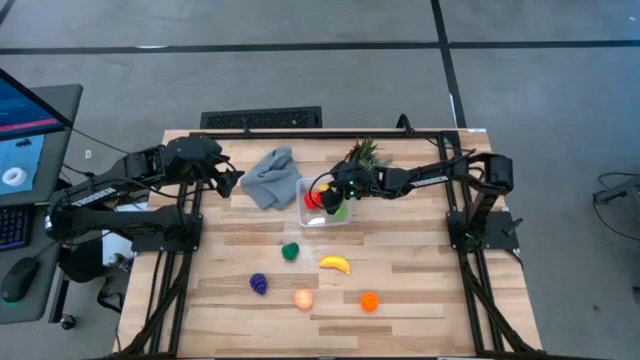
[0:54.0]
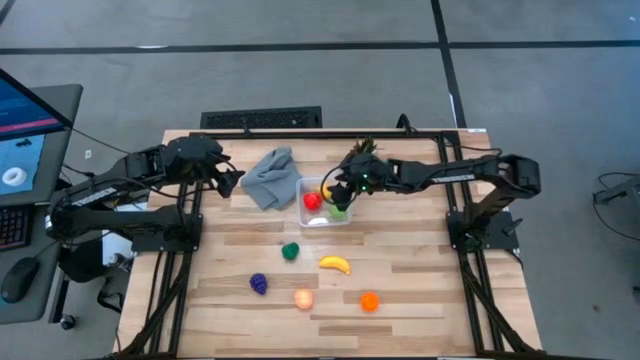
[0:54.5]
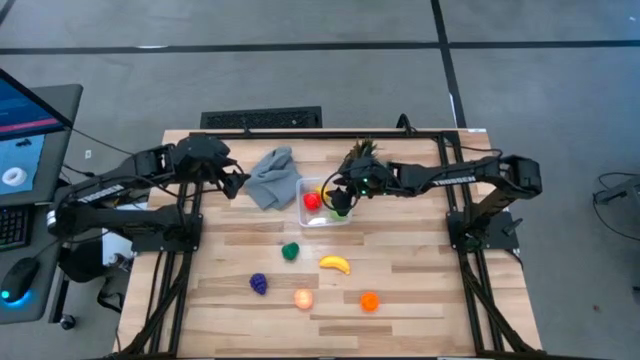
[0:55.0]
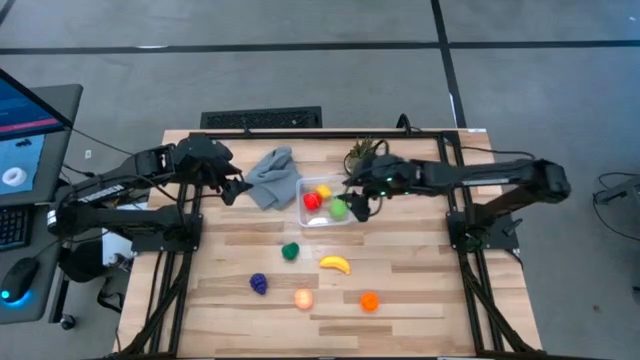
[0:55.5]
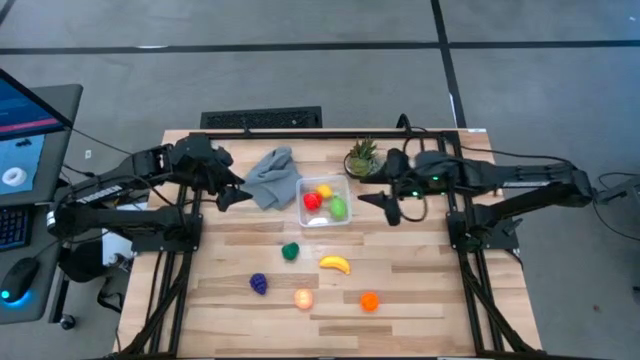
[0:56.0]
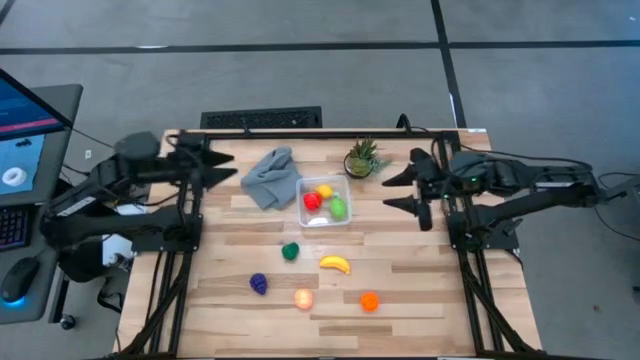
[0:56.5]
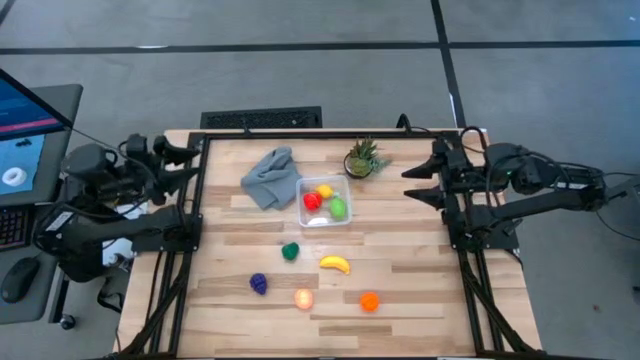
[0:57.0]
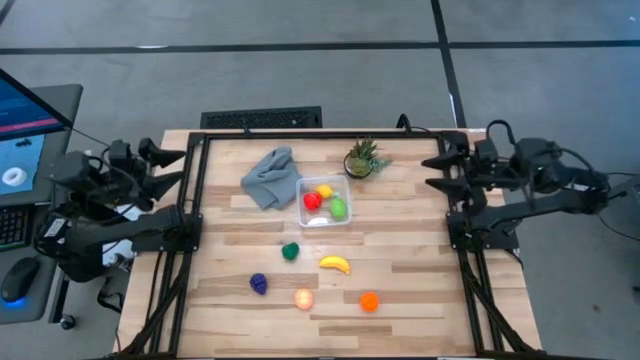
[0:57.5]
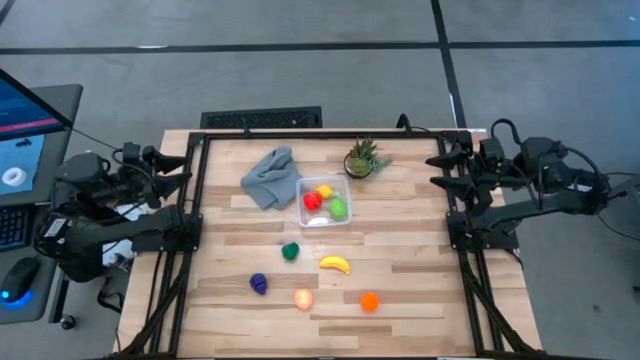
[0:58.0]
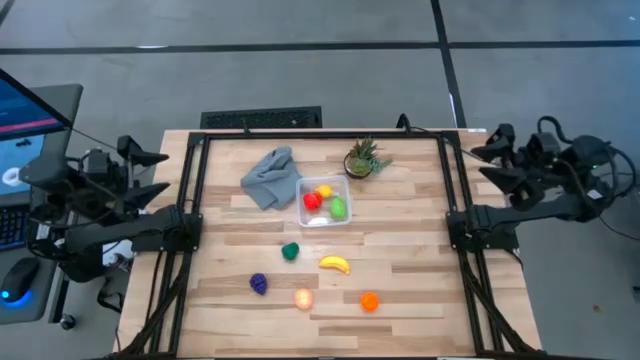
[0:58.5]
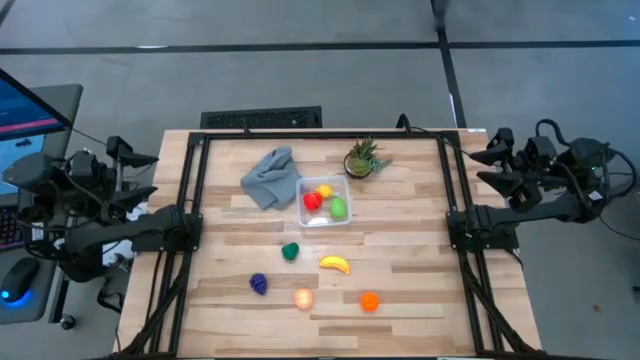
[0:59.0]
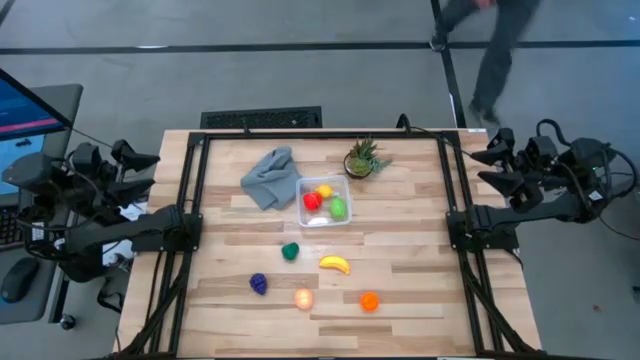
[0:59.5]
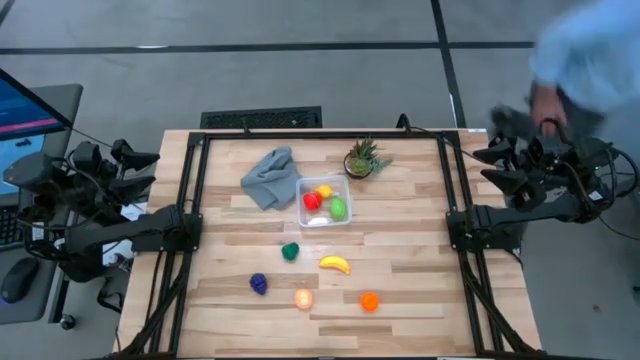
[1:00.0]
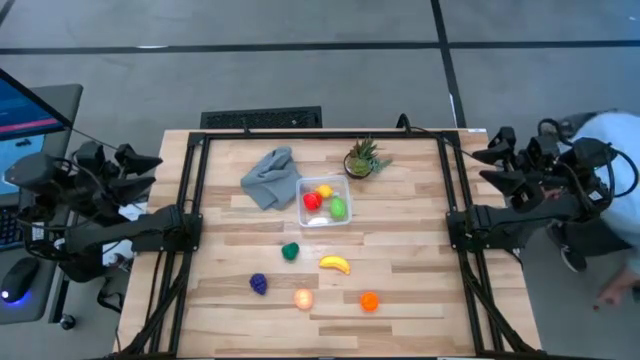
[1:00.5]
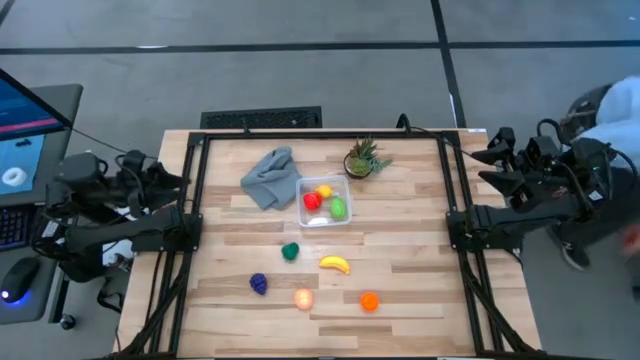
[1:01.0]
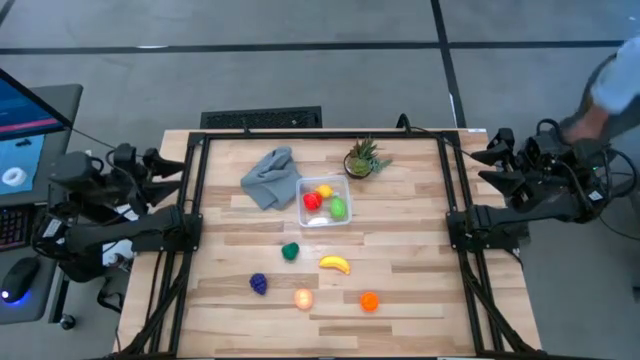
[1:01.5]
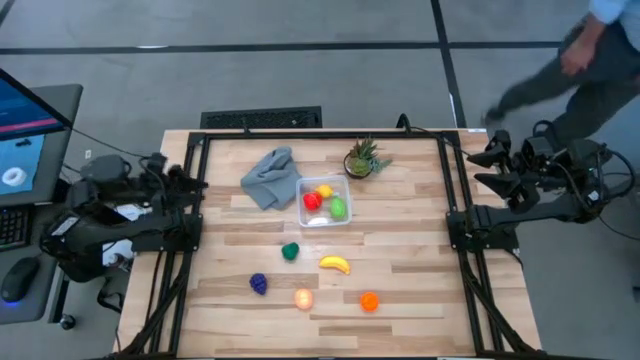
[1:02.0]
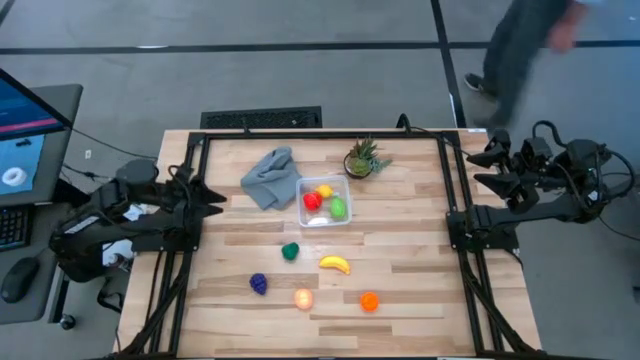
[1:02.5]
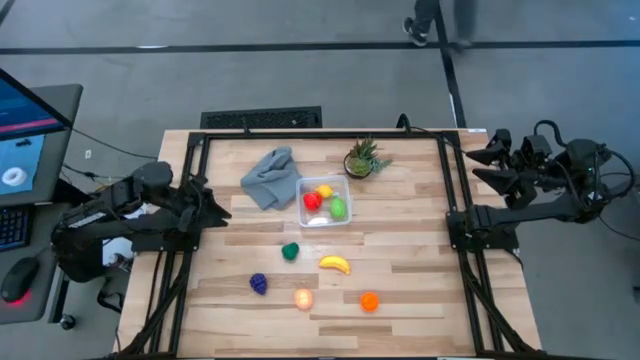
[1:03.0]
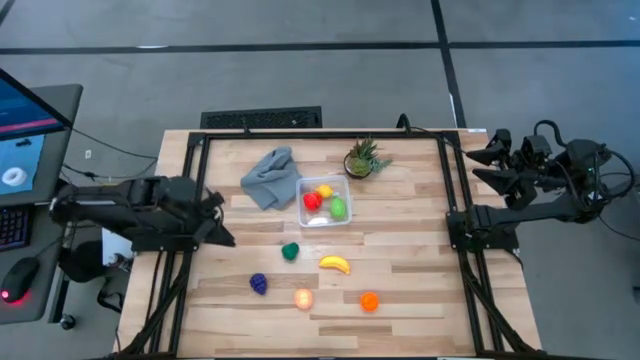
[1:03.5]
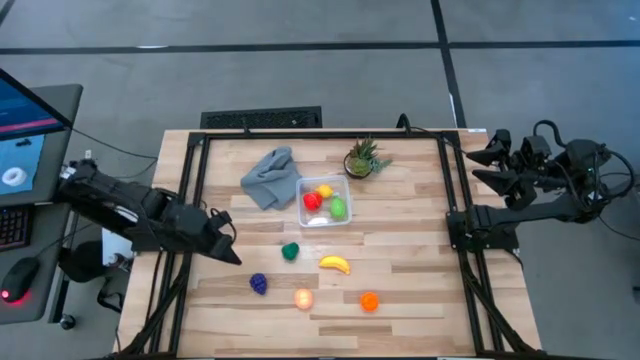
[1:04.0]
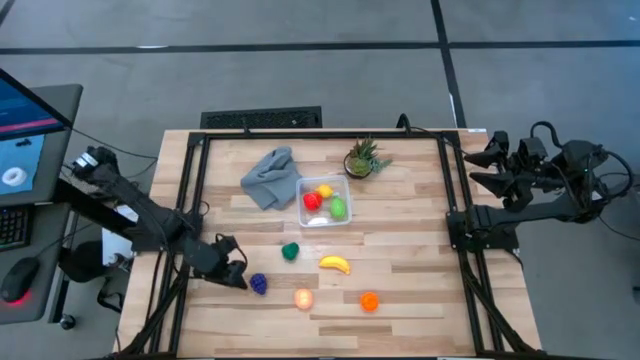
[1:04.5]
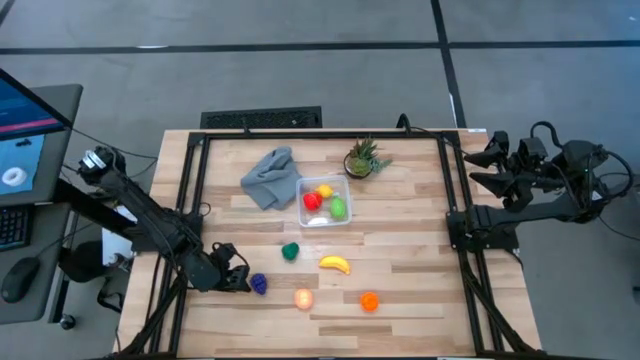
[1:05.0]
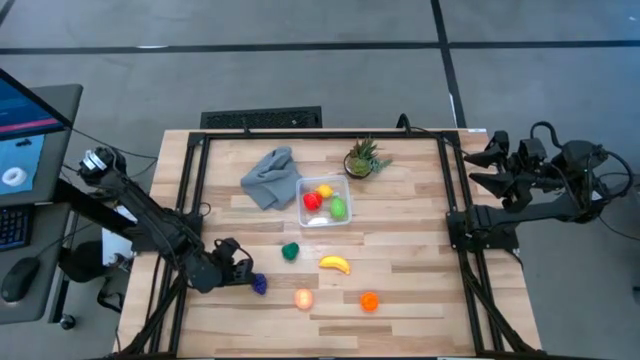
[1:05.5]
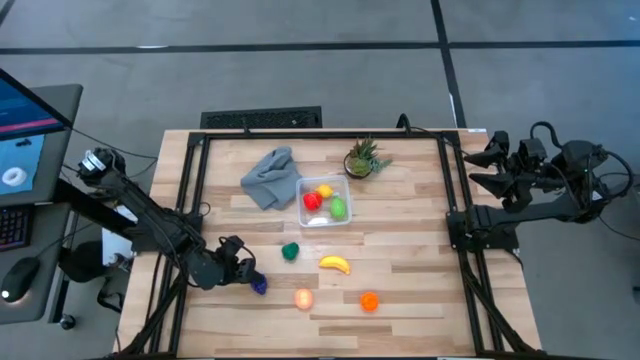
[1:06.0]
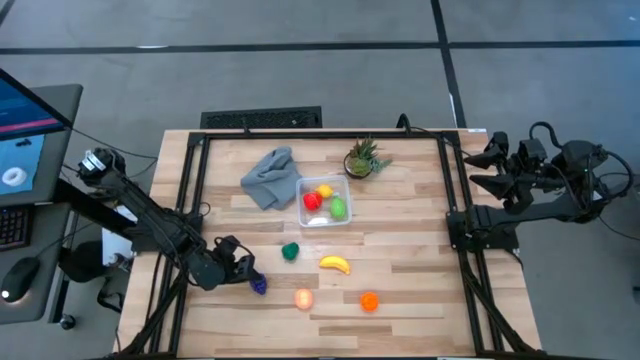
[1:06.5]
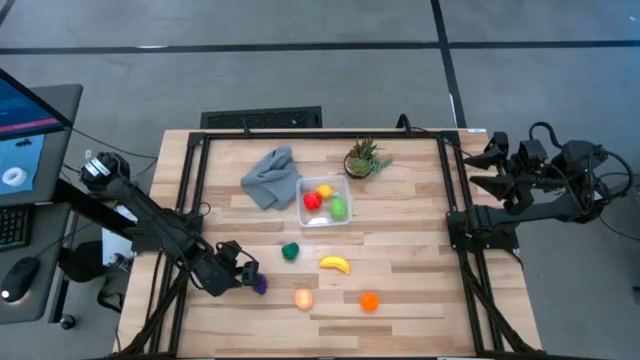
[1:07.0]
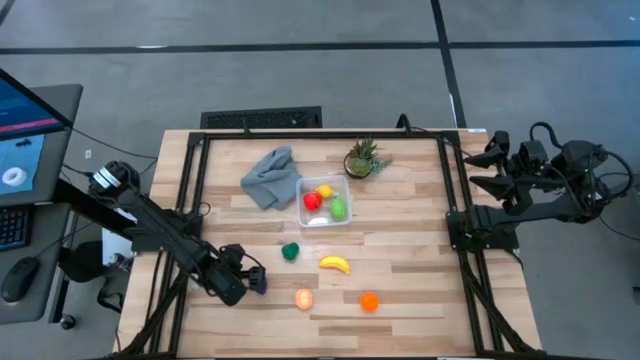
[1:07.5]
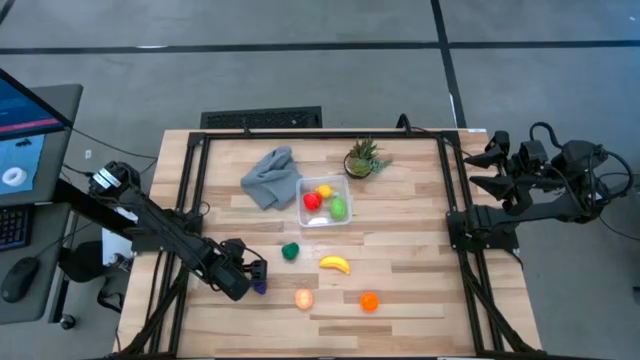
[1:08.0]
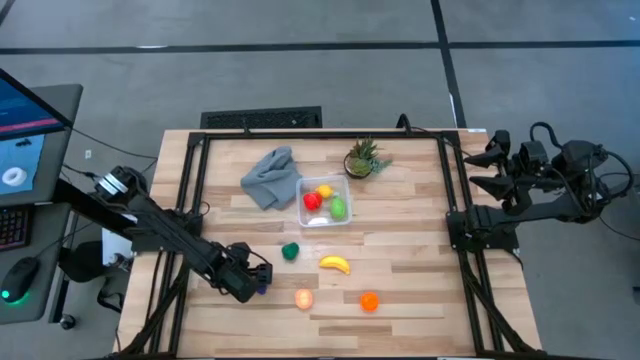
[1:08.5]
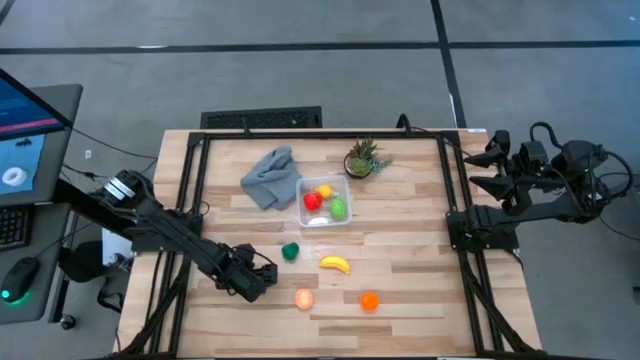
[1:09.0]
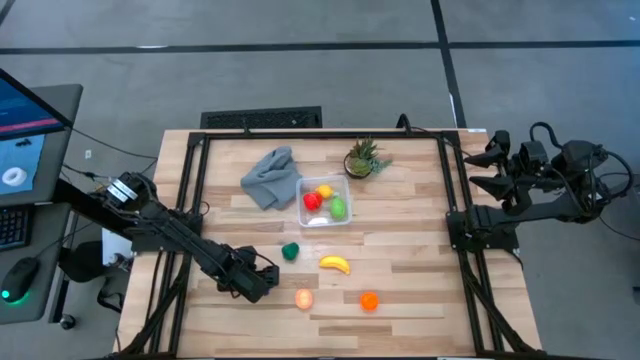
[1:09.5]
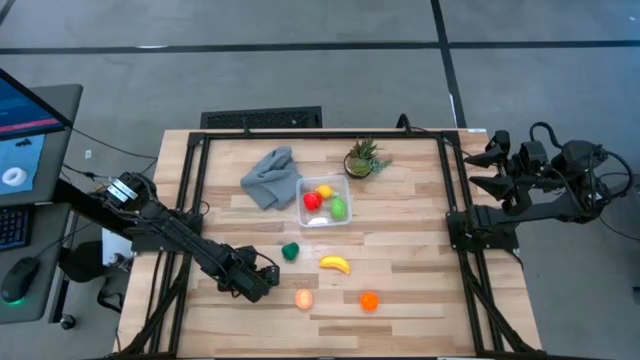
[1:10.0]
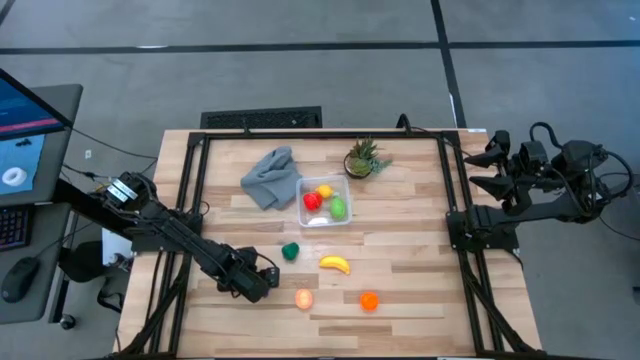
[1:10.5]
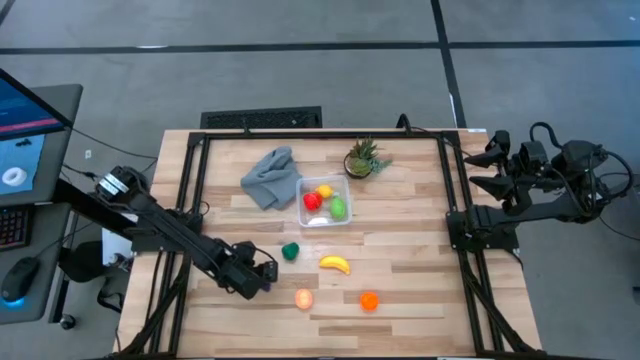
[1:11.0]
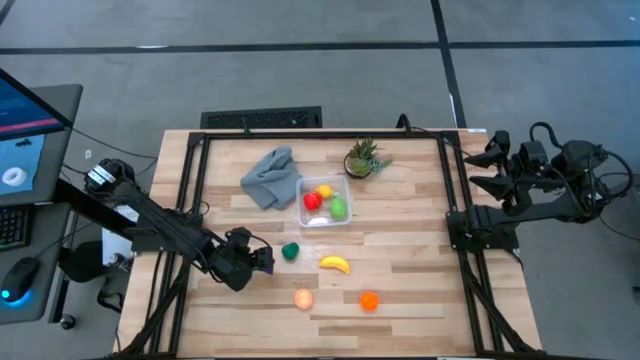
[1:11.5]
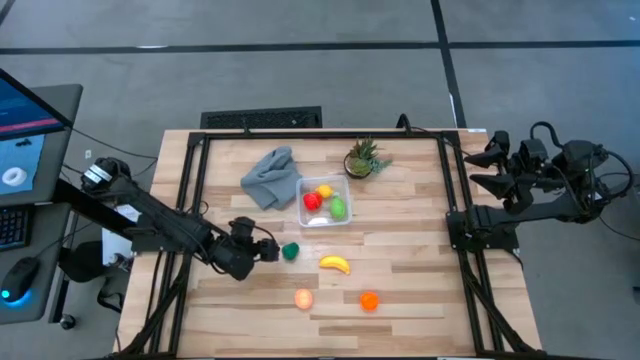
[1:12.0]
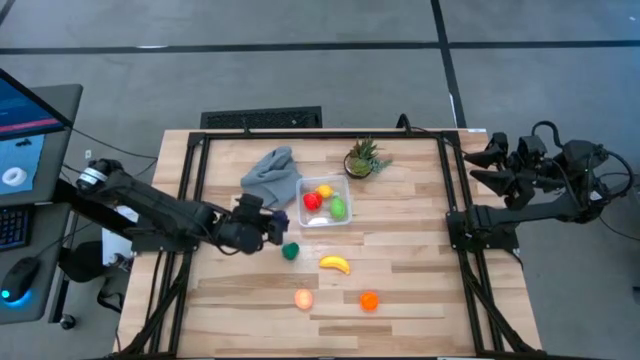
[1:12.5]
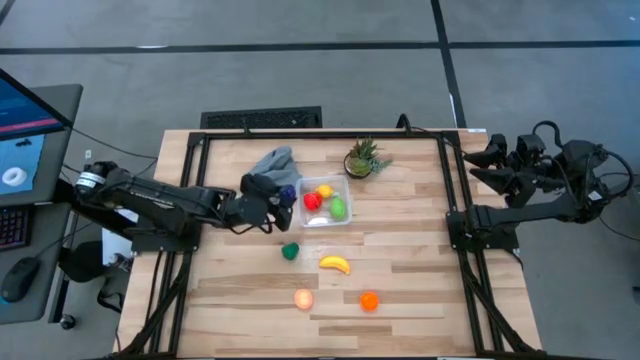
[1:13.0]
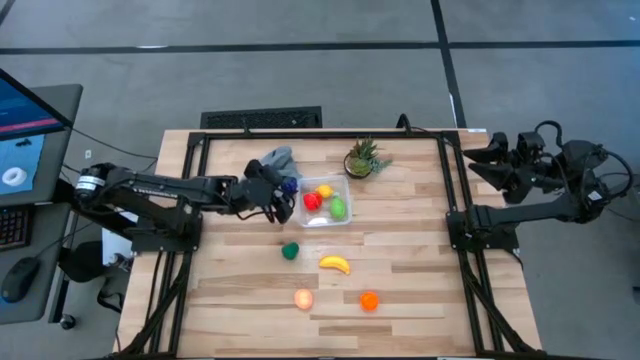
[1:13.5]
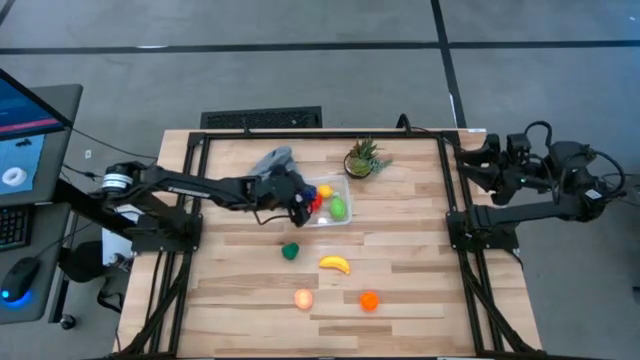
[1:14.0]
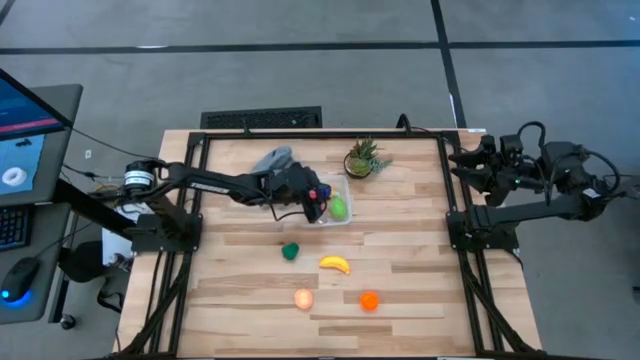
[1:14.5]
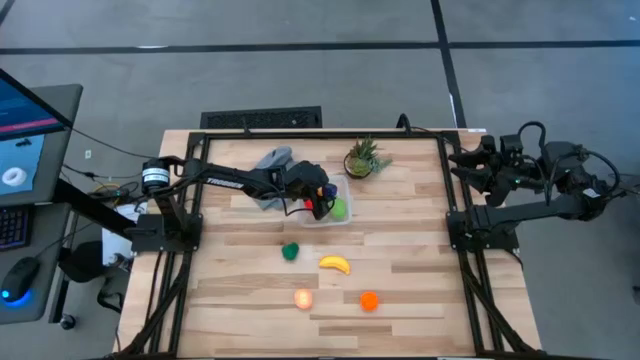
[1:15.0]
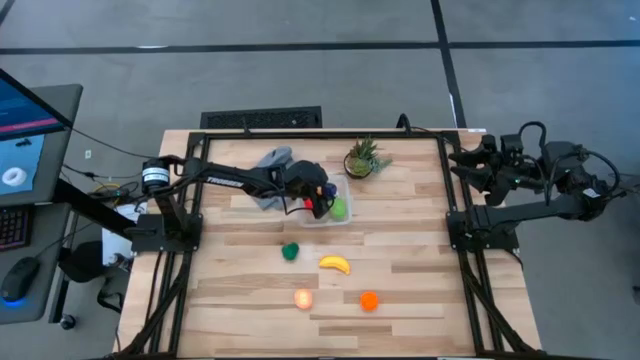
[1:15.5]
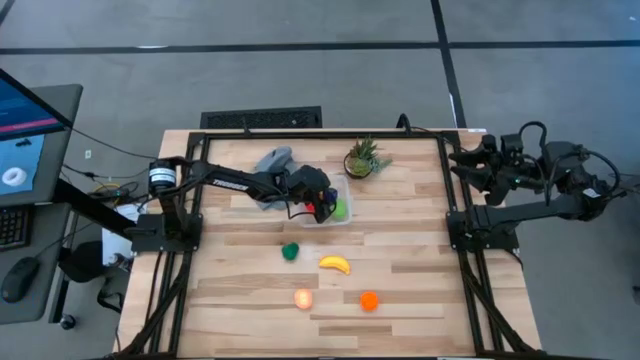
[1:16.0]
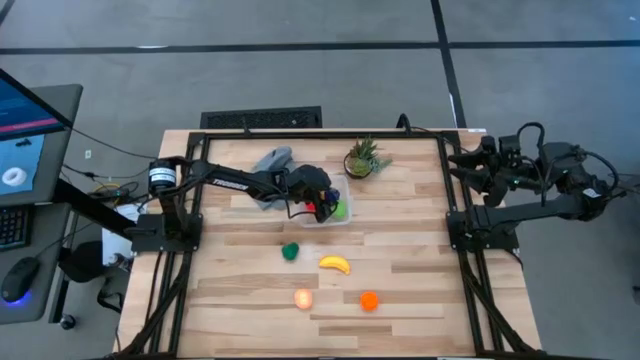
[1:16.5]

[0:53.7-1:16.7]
Task: Pick and placing Produce into tupperware
Put the purple grapes into the transparent bin
